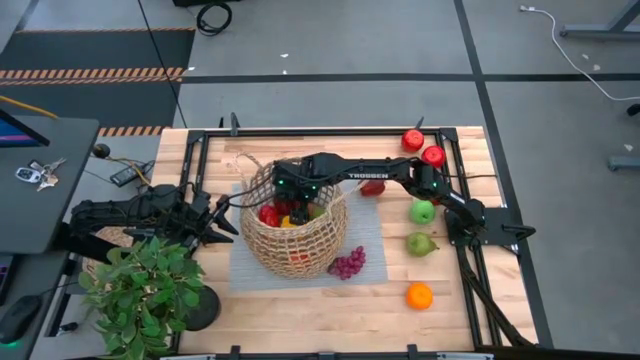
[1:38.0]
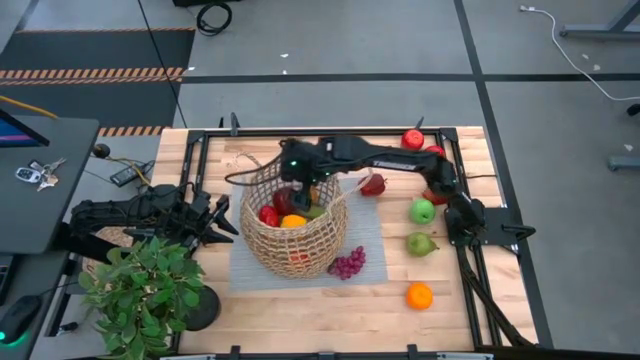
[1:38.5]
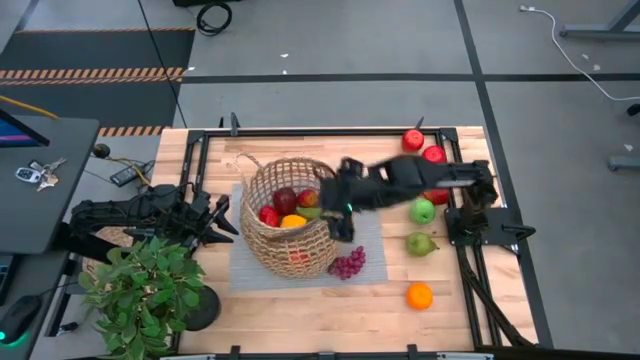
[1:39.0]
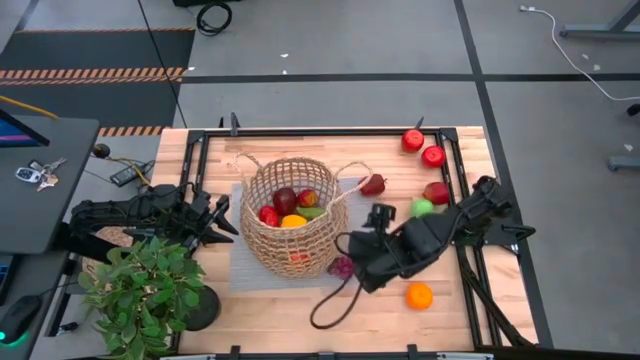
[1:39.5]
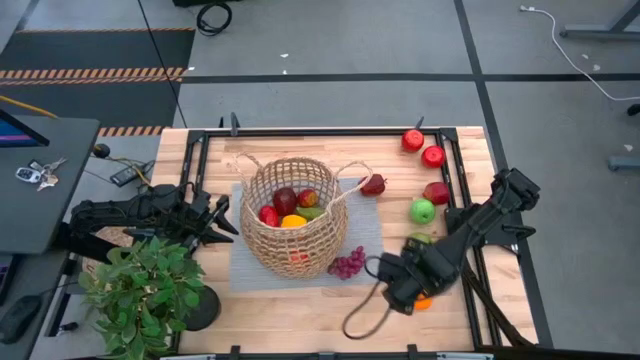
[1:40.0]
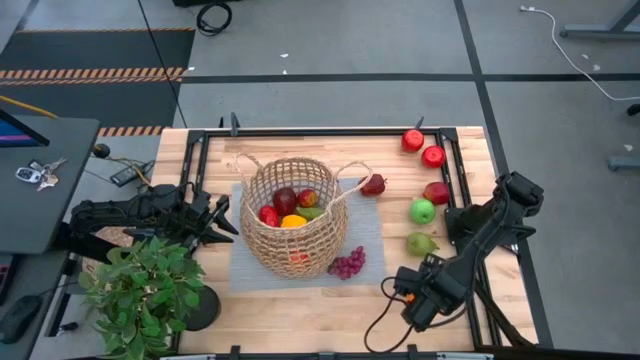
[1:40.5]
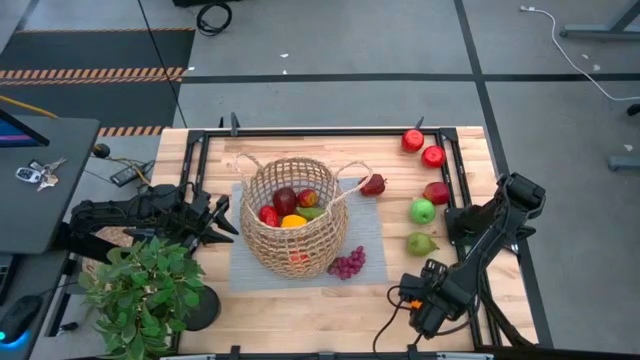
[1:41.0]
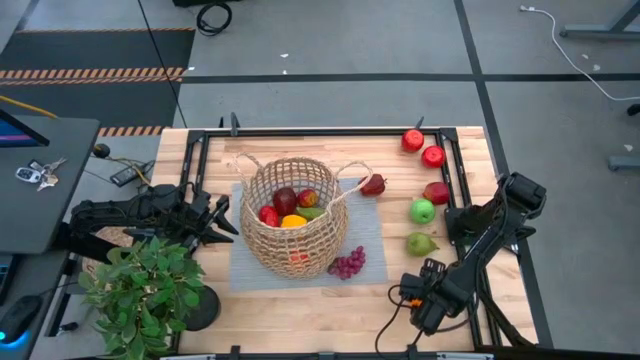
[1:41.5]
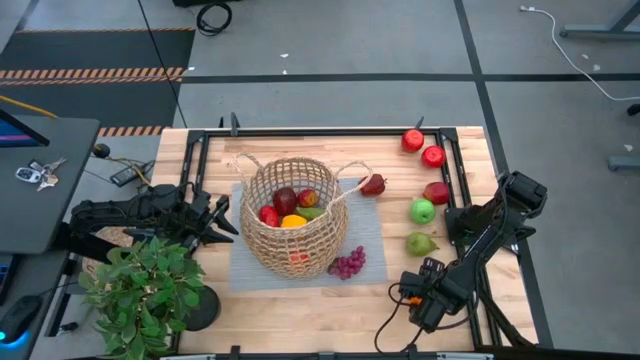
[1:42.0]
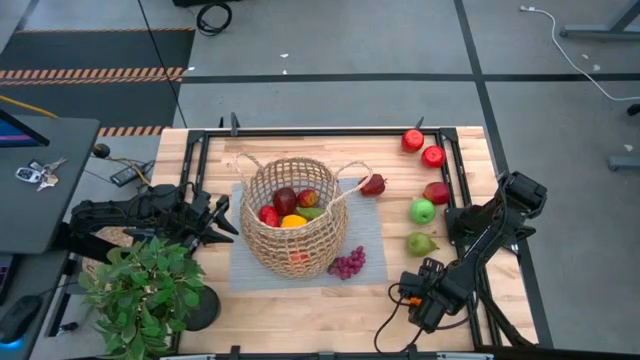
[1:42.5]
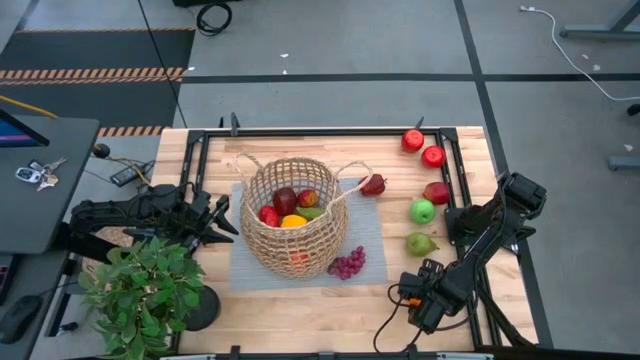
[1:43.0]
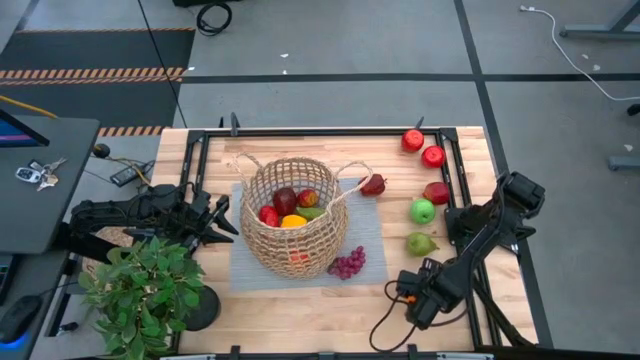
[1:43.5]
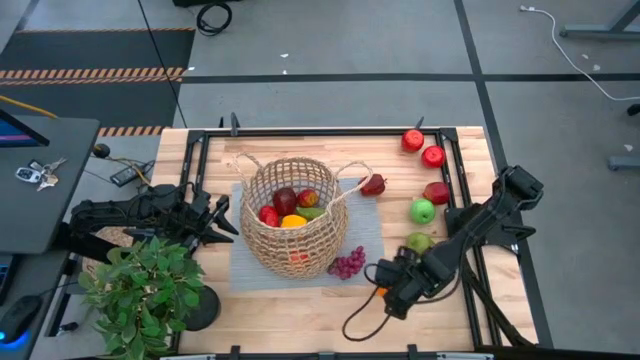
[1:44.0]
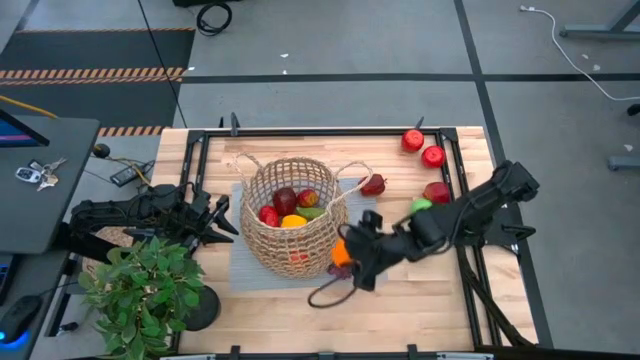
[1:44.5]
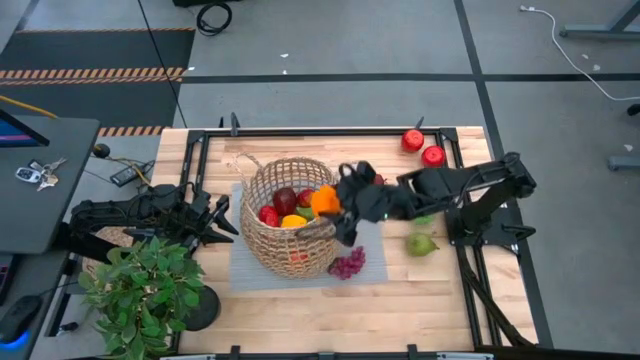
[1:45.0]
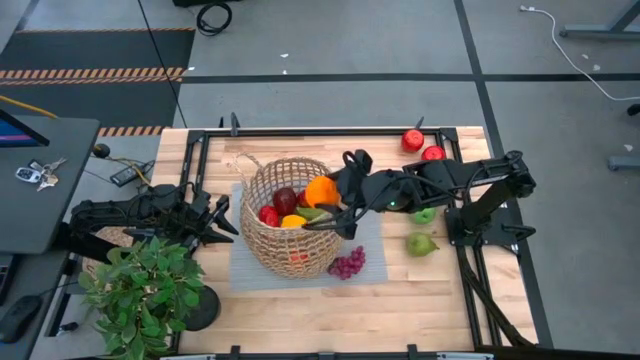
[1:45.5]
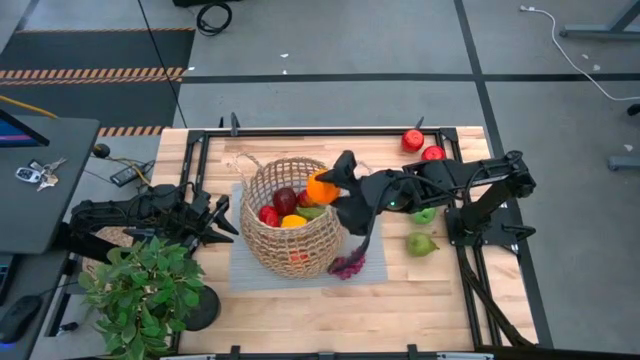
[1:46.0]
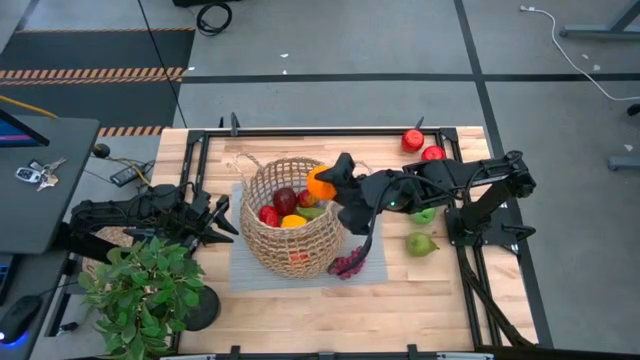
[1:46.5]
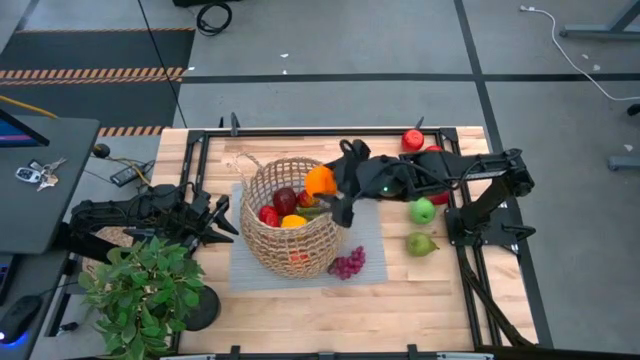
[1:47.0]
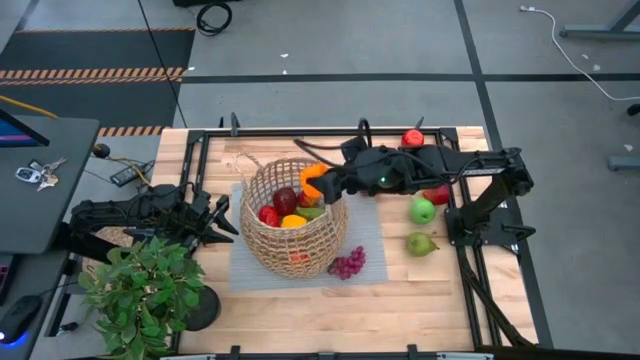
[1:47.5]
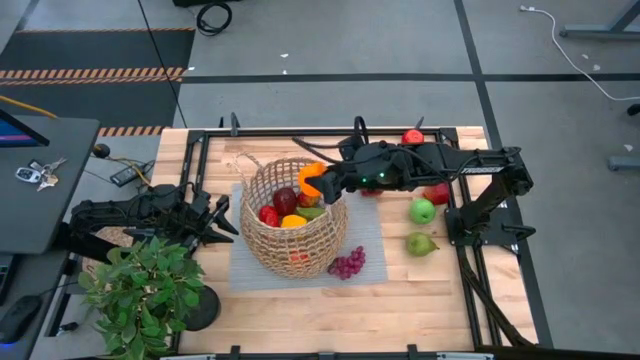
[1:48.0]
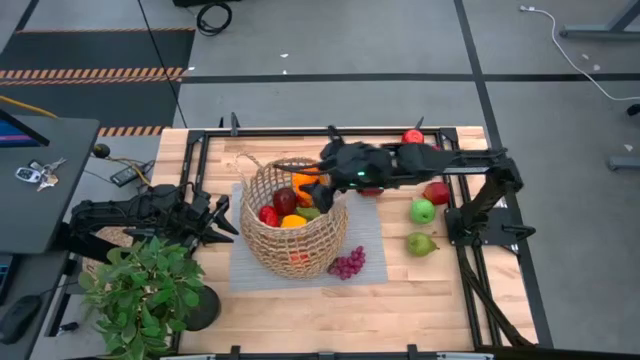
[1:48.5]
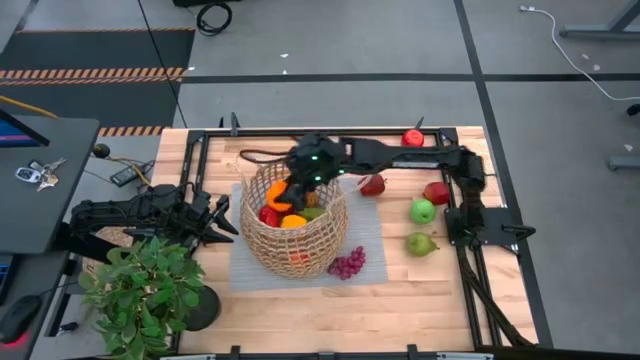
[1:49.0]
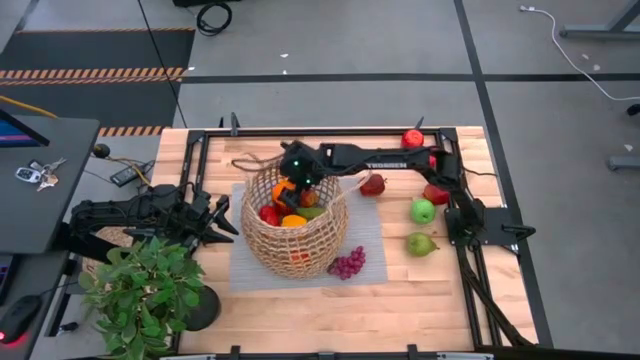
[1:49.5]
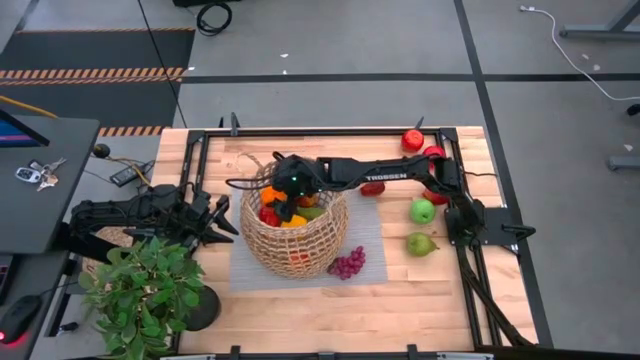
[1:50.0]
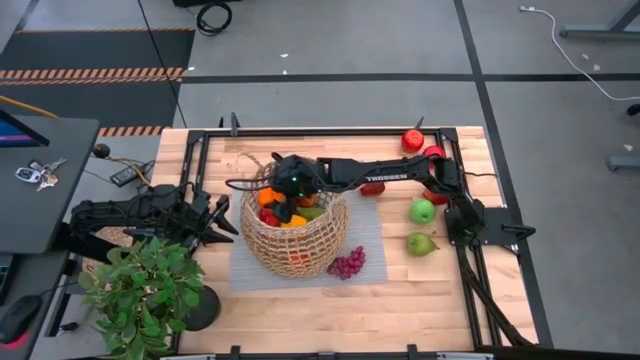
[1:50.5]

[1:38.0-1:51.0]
Task: Build produce basket
Put the orange into the brown basket

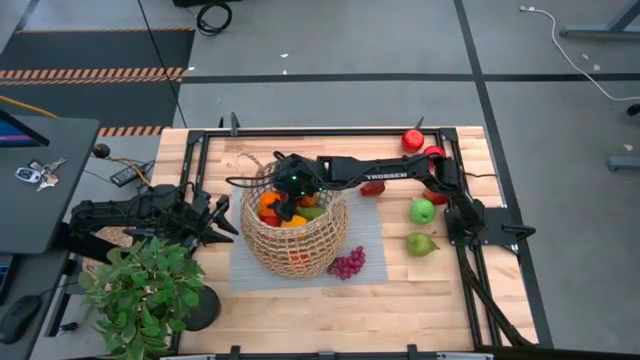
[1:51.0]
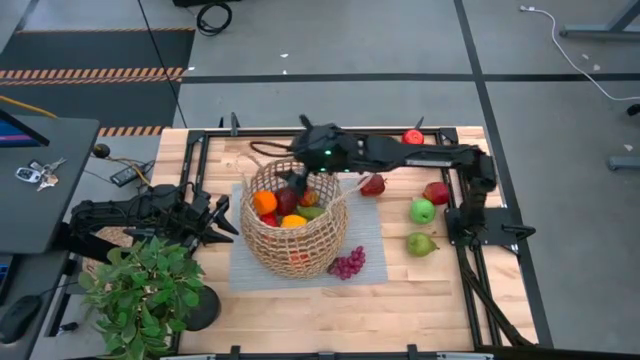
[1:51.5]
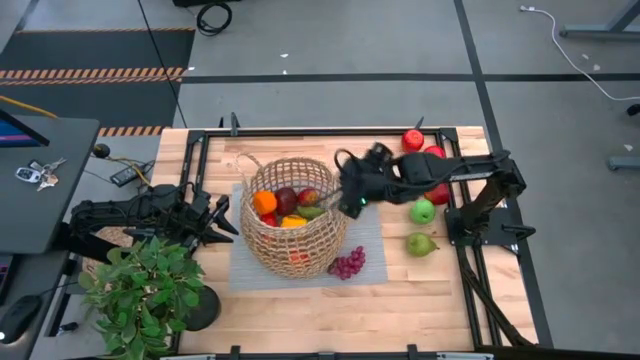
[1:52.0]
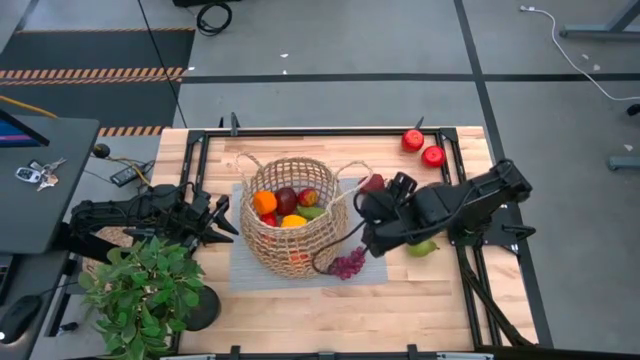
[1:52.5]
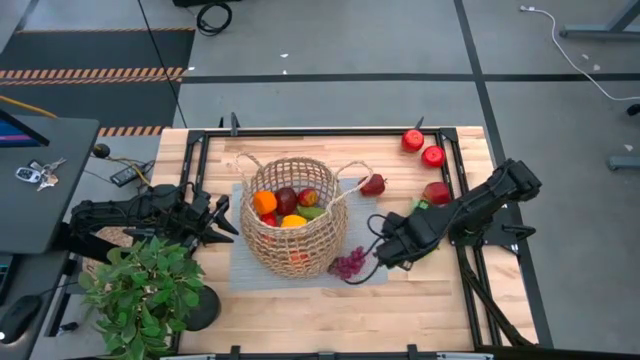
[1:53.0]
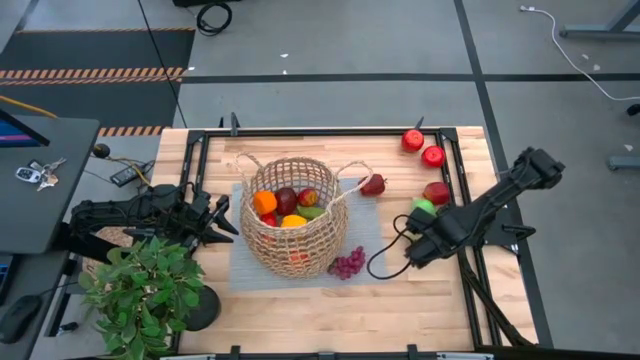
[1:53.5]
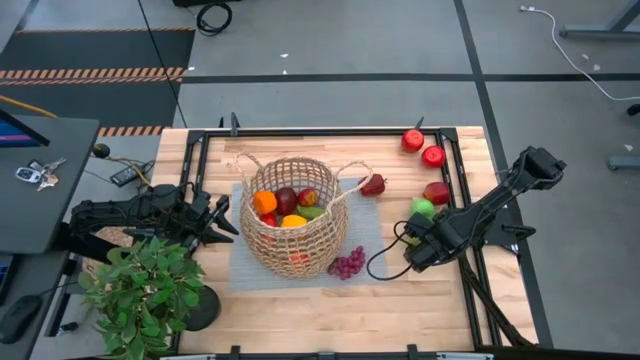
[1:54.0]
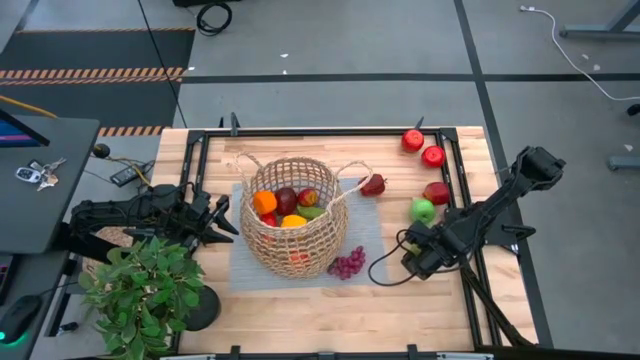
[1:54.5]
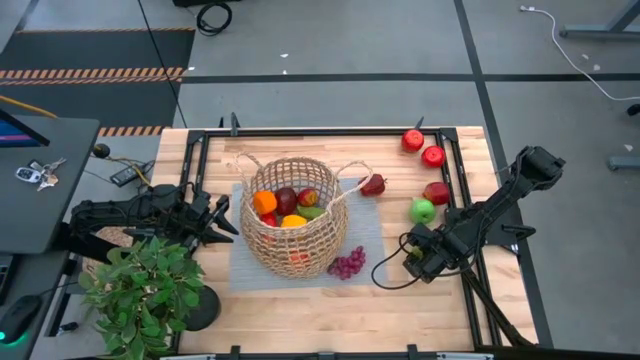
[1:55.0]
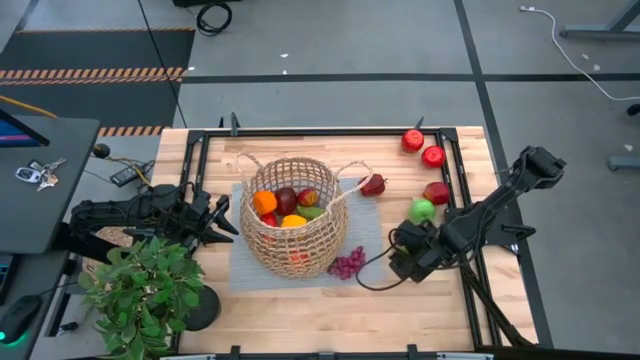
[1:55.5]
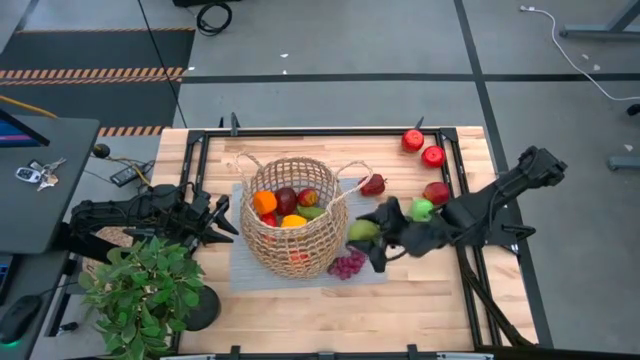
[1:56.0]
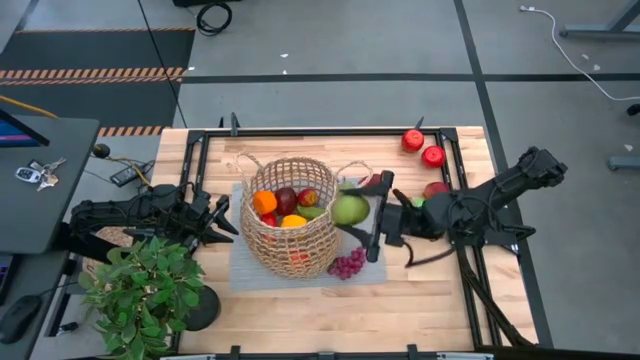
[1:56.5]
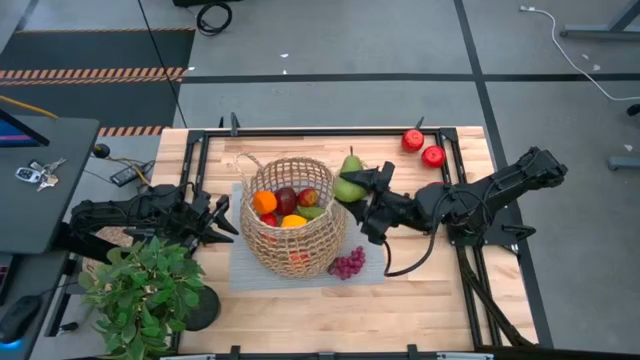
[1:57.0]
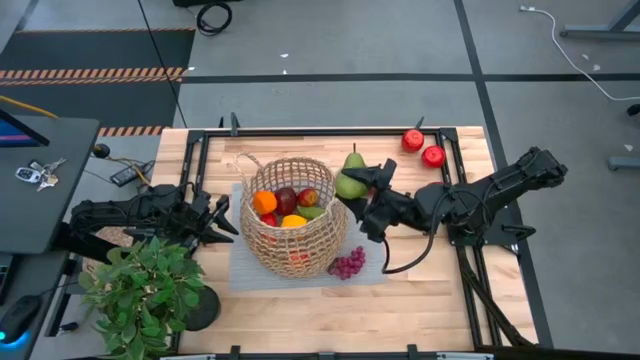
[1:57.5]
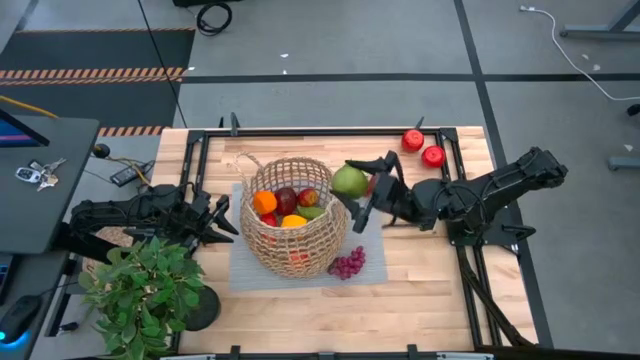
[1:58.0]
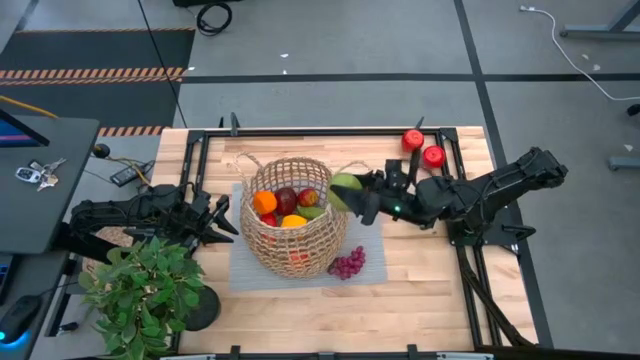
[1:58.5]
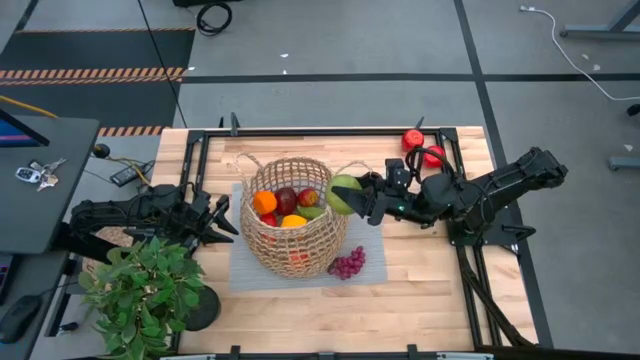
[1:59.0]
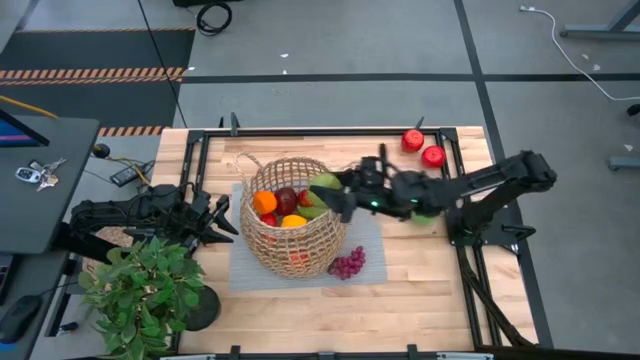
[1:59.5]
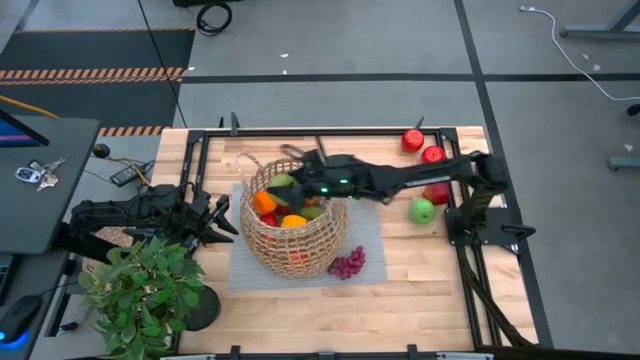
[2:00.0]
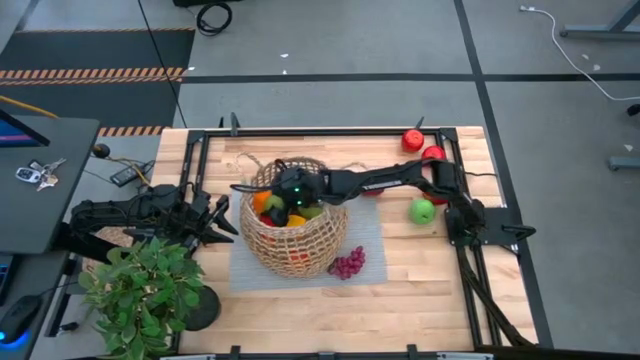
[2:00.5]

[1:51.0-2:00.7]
Put the pear into the brown basket
